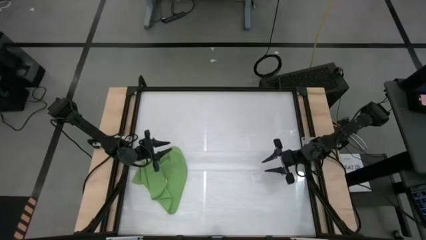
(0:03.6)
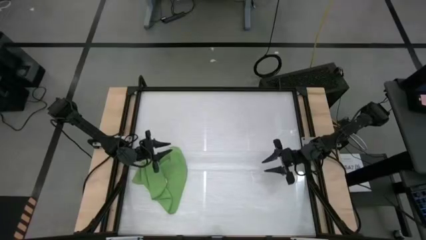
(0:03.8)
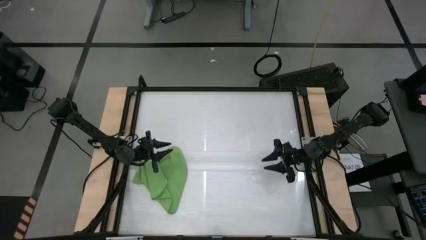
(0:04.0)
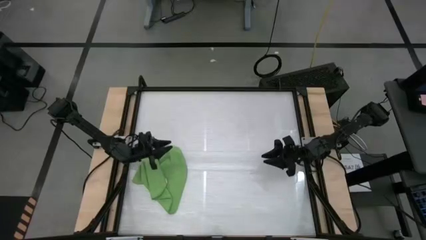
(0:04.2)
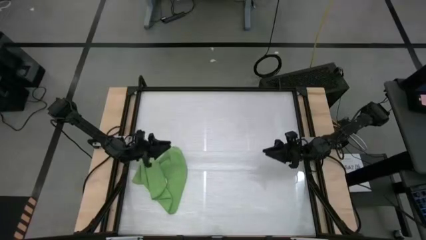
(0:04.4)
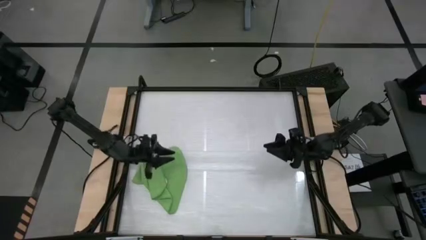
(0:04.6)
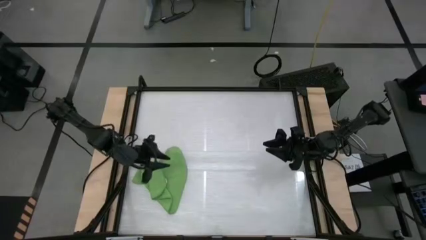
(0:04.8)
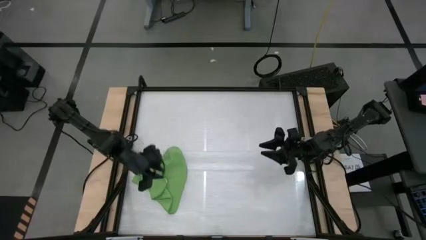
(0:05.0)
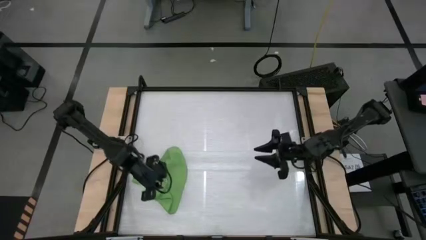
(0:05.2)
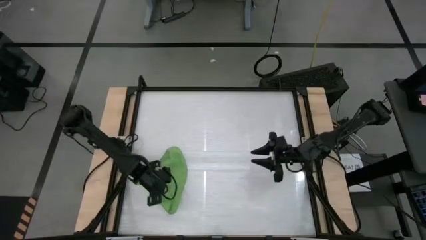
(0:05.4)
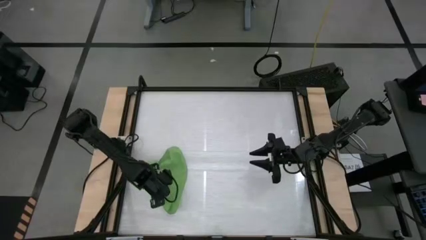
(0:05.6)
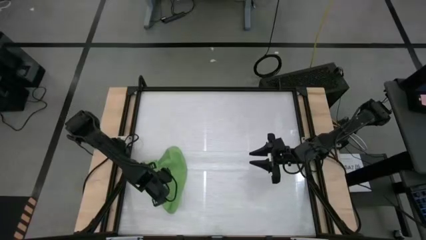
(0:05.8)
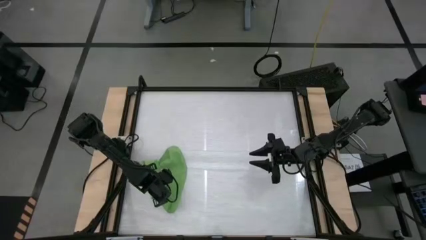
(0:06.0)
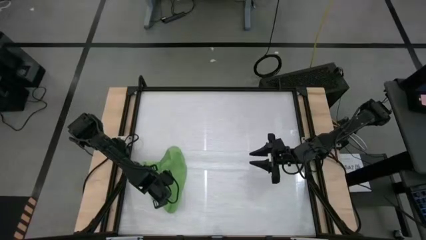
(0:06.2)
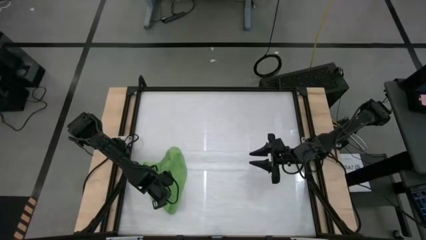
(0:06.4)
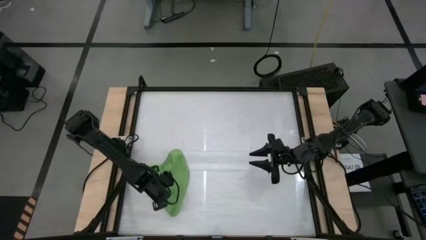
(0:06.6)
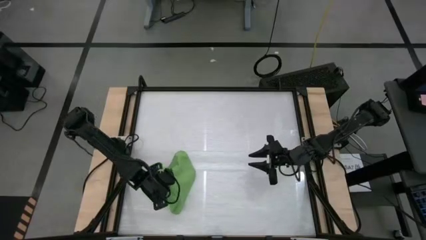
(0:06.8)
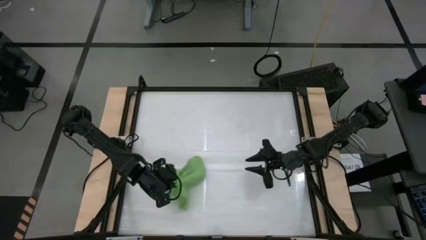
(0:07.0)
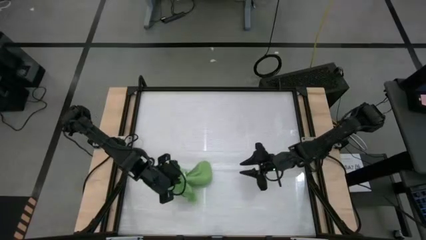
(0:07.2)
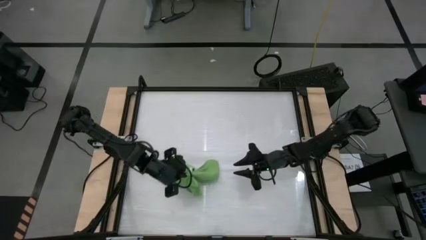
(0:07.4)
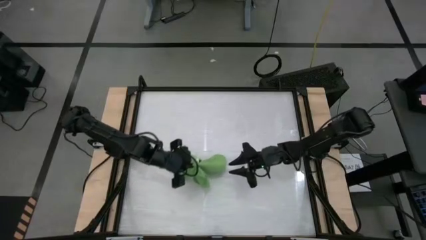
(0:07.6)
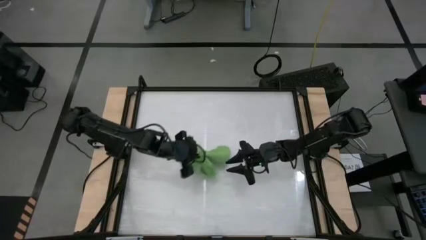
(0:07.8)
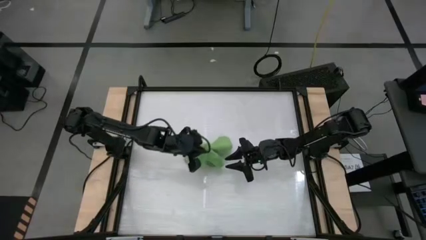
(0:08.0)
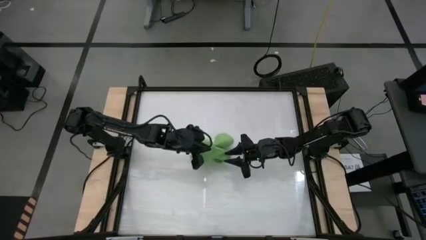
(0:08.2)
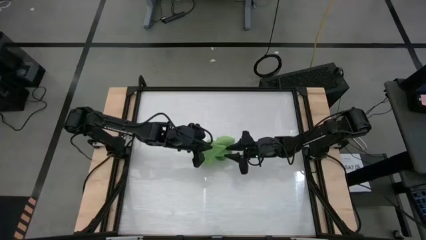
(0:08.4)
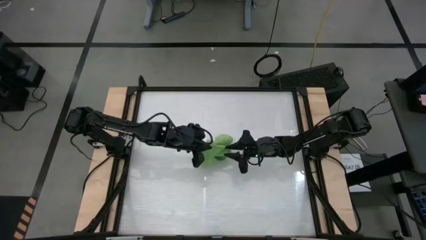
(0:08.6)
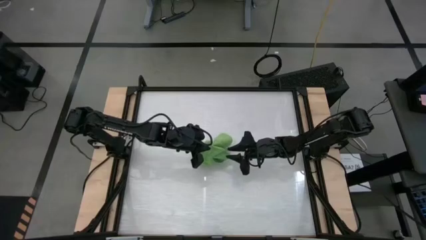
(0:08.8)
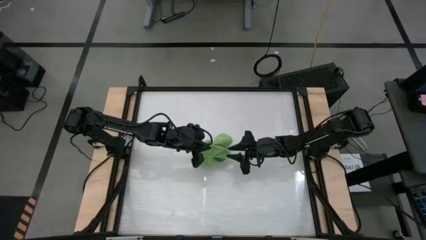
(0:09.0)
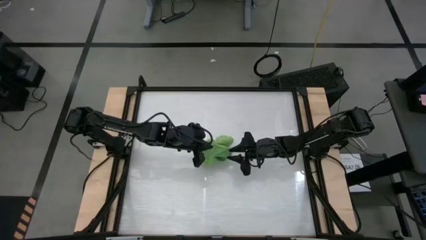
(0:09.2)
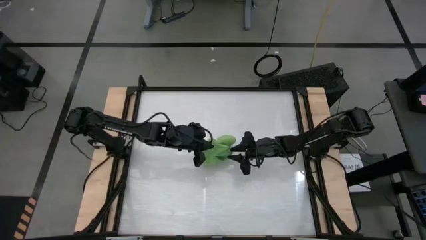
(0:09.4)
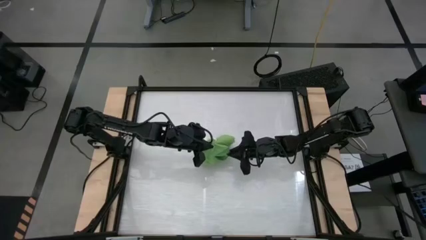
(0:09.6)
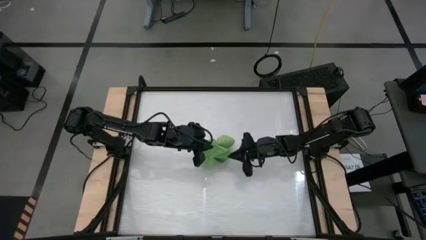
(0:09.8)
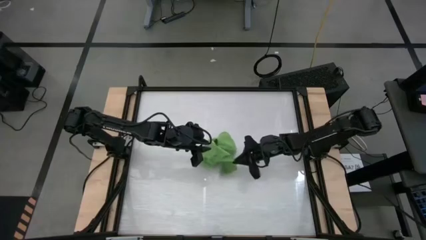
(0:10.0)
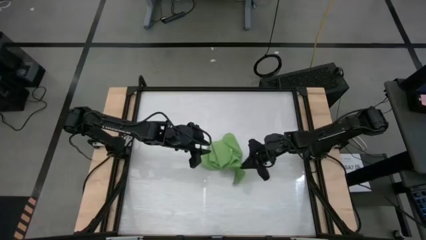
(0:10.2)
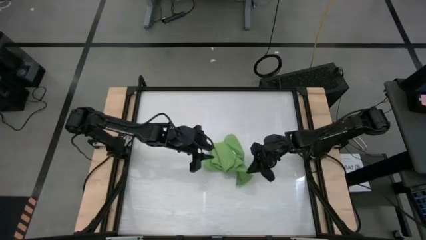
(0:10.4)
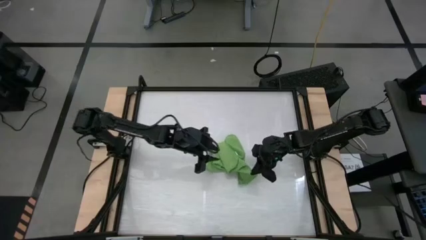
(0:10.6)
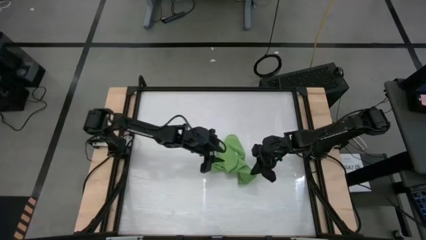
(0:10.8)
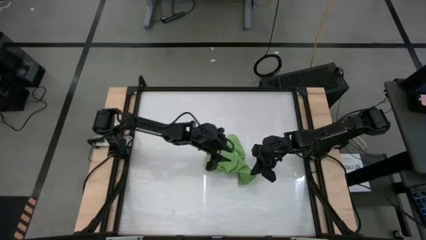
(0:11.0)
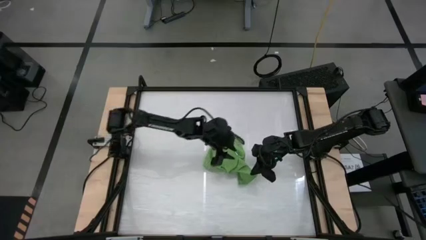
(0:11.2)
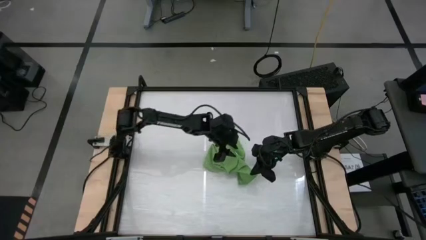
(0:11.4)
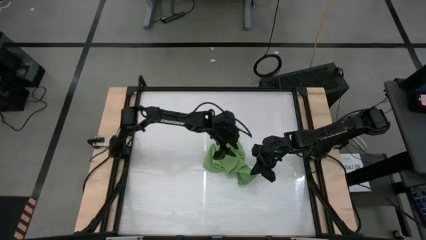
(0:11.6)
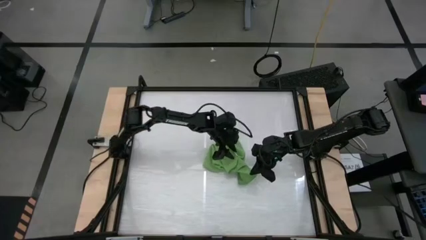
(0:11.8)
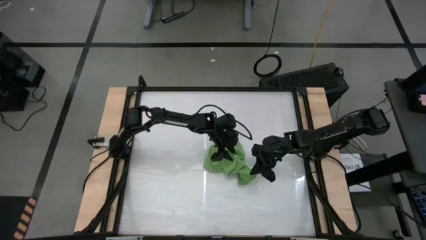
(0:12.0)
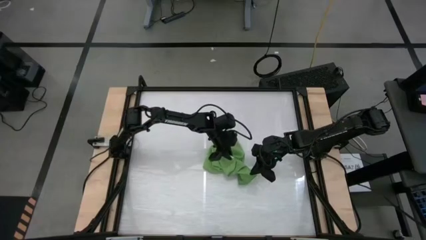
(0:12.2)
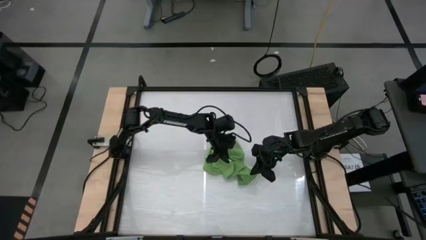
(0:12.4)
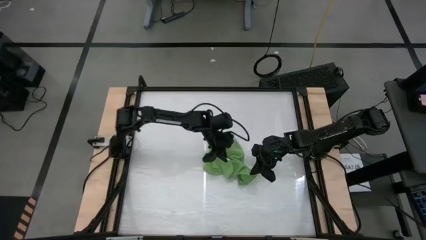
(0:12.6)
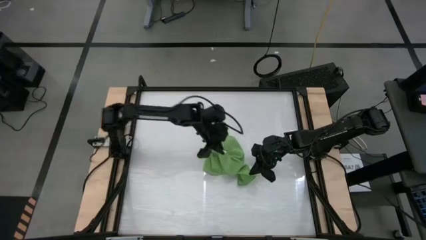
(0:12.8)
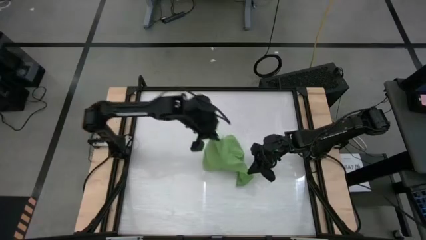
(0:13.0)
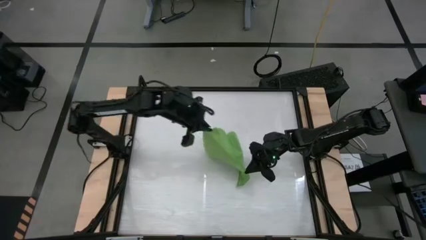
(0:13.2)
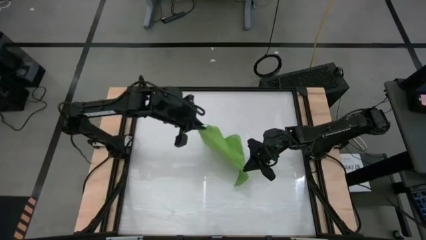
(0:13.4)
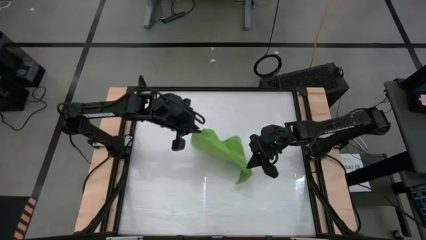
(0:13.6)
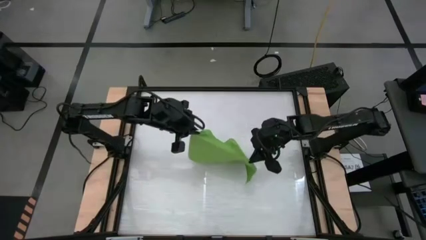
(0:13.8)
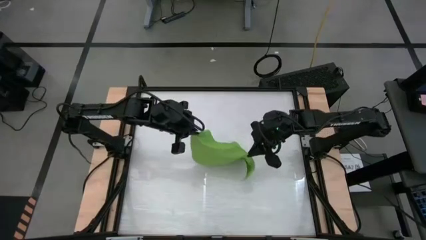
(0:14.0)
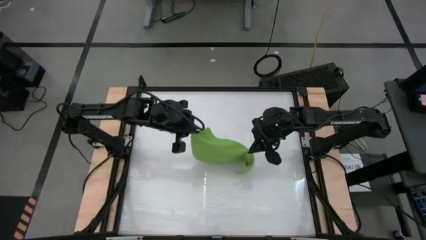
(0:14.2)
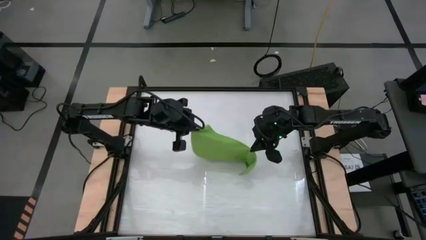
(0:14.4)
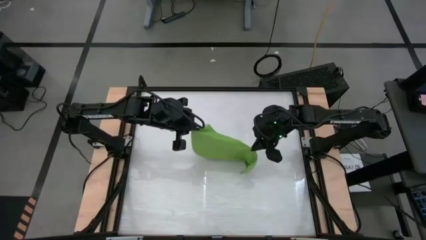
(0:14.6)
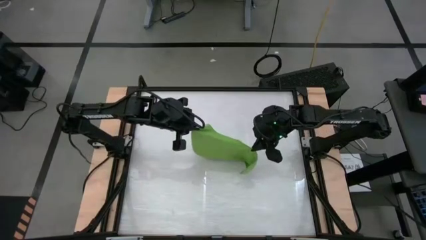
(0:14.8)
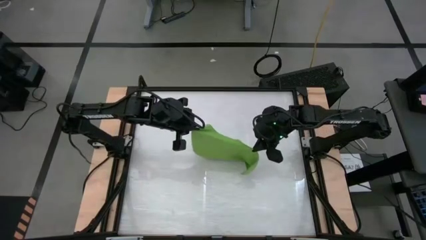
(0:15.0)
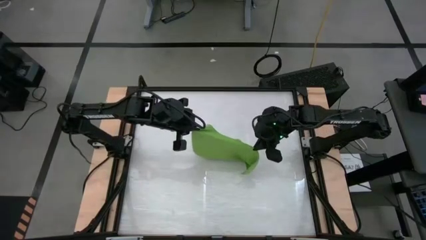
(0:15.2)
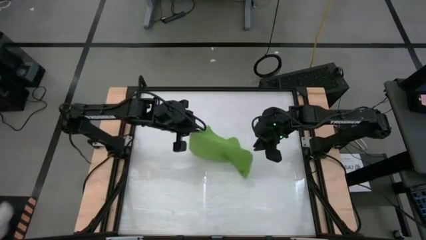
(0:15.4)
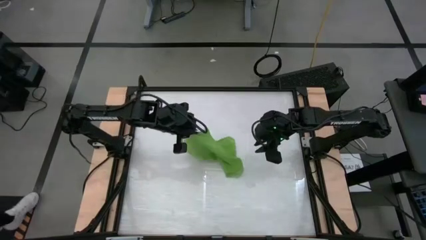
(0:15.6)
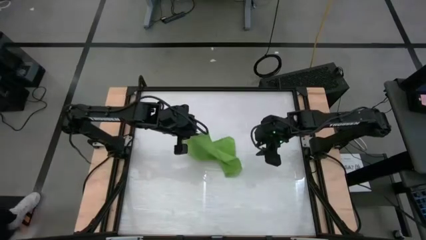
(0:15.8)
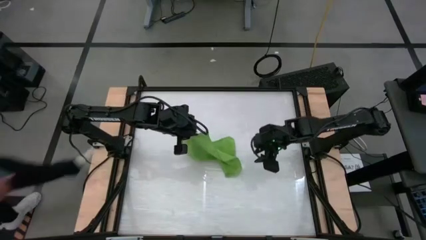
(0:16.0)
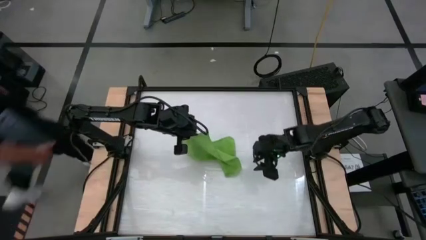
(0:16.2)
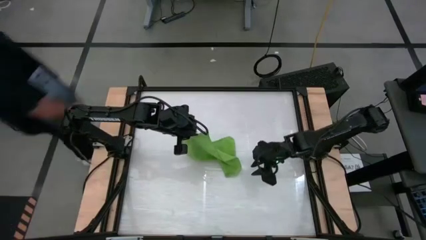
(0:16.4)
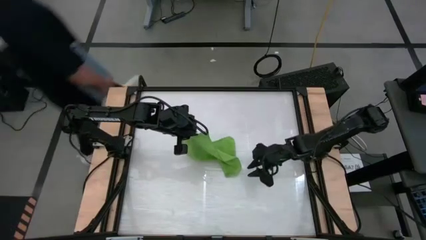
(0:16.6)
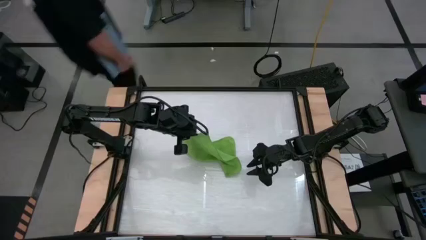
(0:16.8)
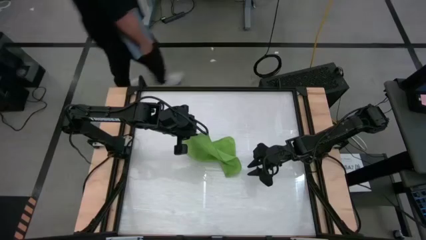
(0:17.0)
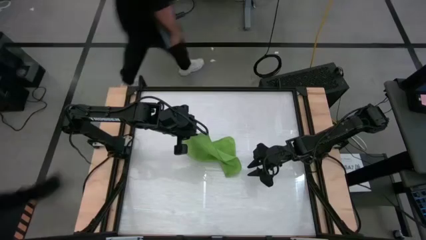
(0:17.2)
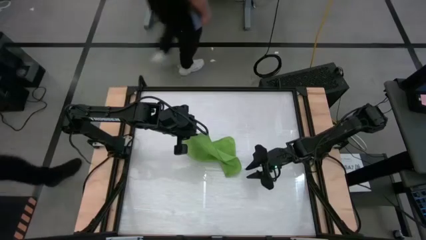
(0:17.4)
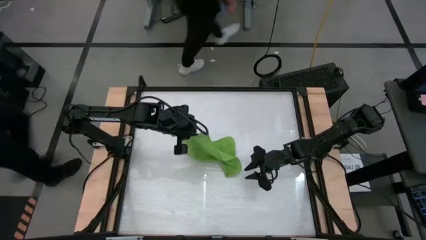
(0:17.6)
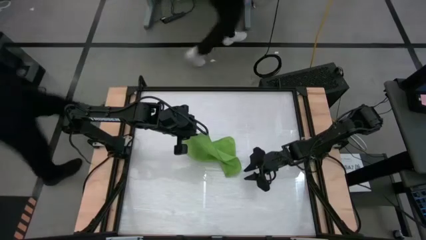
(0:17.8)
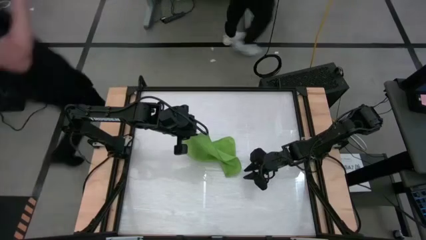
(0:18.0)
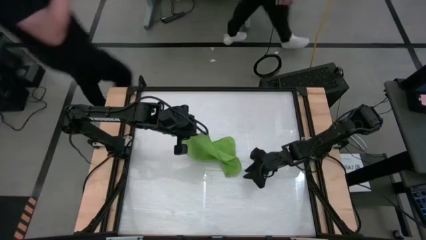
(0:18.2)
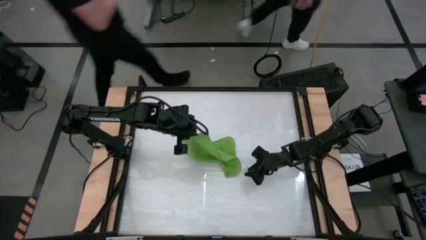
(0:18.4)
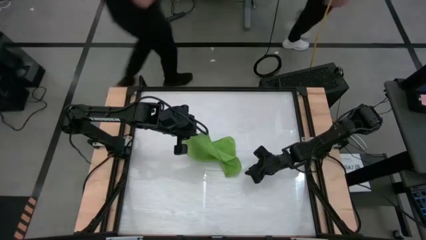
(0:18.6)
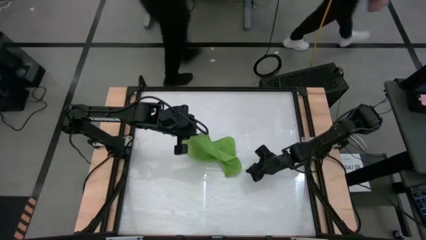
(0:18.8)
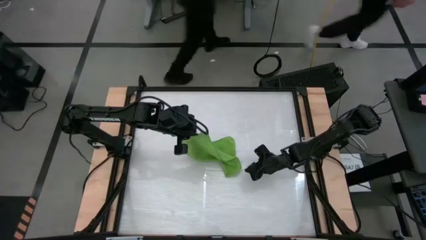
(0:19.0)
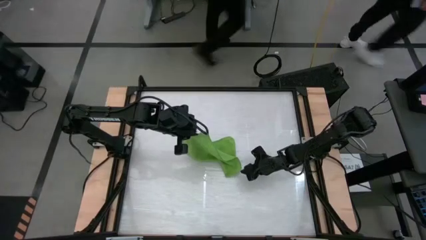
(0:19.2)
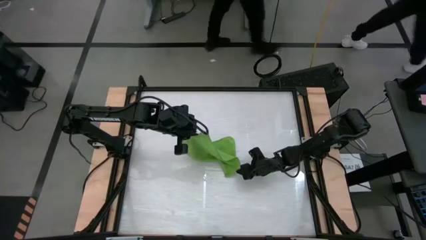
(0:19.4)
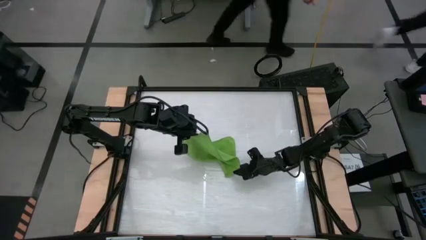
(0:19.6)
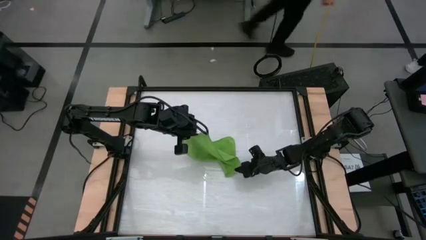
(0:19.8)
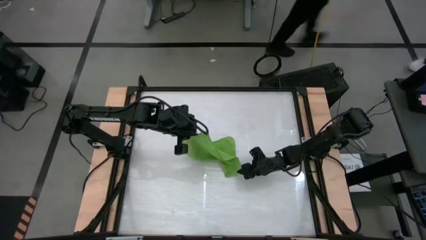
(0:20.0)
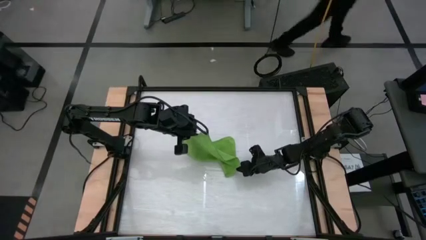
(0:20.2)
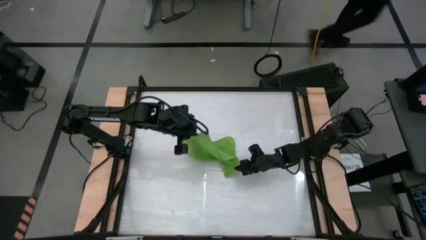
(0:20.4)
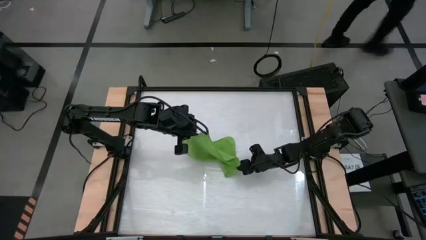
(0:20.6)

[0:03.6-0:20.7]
Task: Roll towel into tight, uniform cylinder
Roll the green towel
